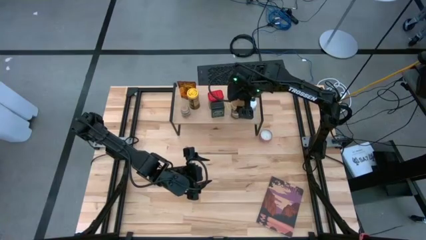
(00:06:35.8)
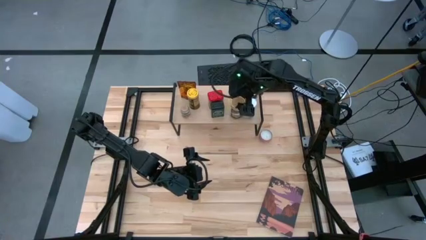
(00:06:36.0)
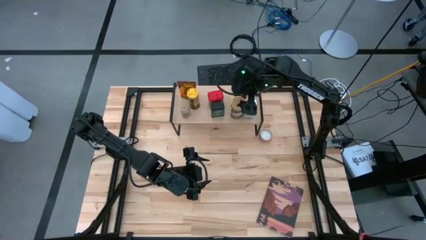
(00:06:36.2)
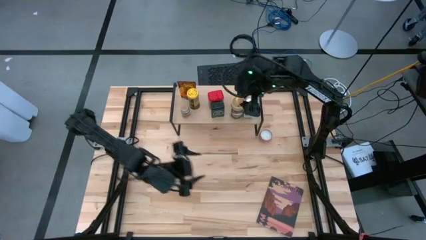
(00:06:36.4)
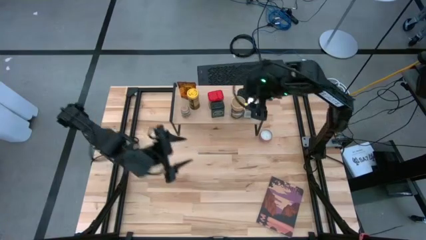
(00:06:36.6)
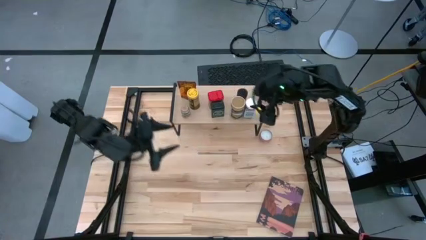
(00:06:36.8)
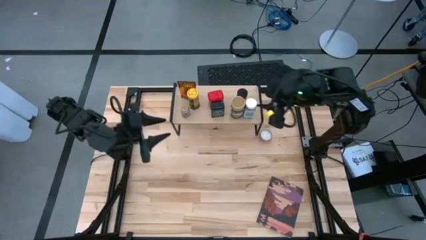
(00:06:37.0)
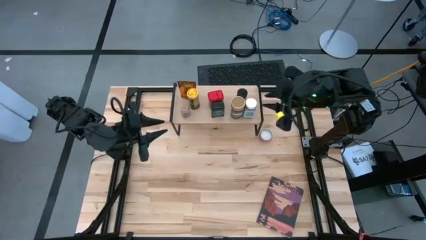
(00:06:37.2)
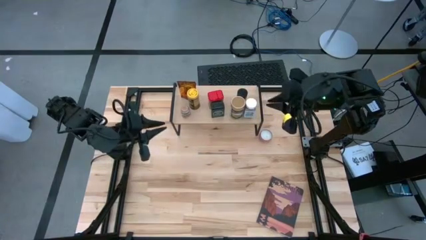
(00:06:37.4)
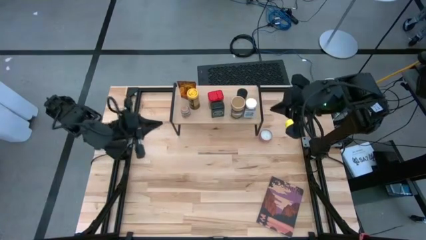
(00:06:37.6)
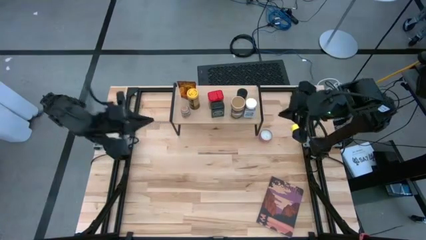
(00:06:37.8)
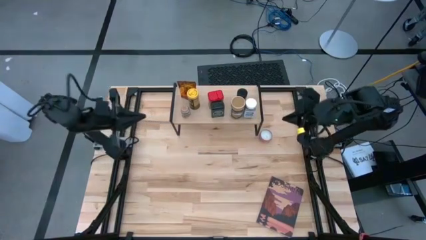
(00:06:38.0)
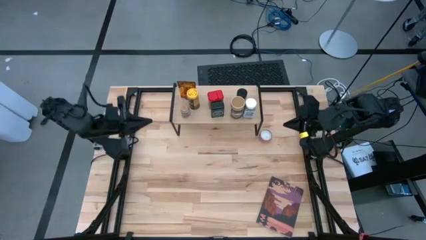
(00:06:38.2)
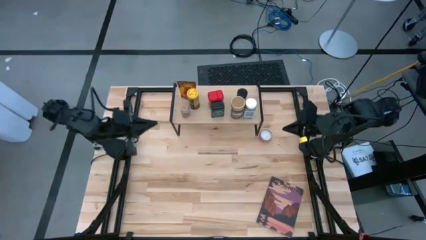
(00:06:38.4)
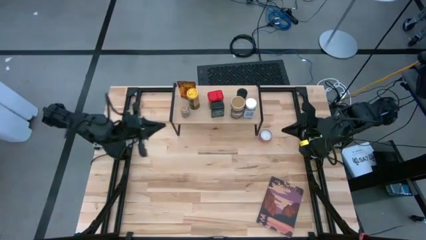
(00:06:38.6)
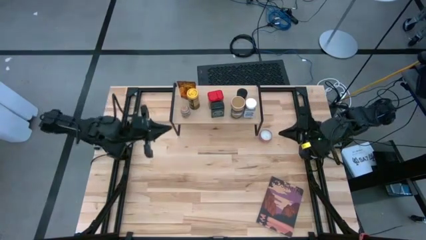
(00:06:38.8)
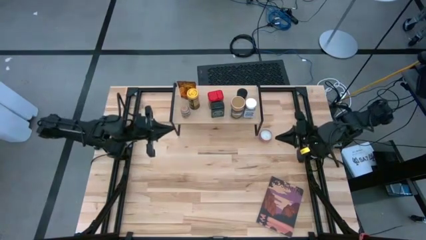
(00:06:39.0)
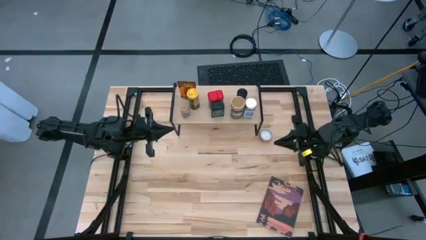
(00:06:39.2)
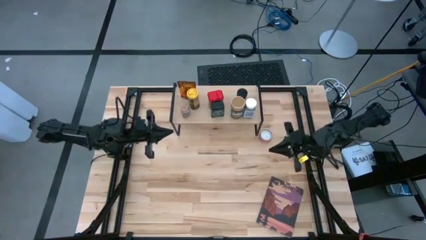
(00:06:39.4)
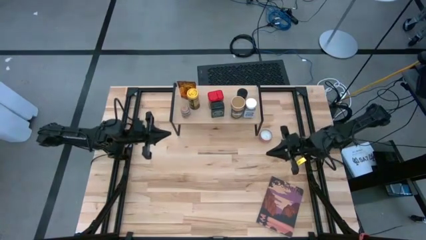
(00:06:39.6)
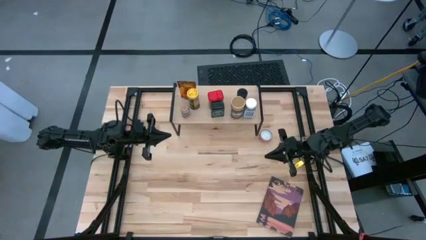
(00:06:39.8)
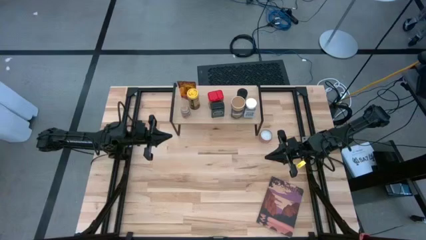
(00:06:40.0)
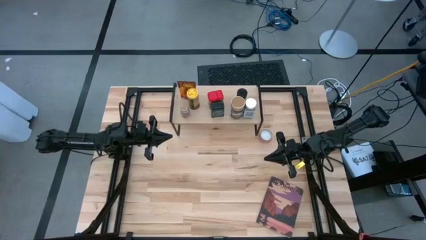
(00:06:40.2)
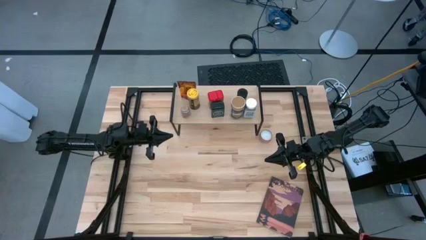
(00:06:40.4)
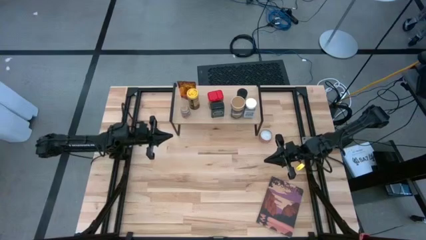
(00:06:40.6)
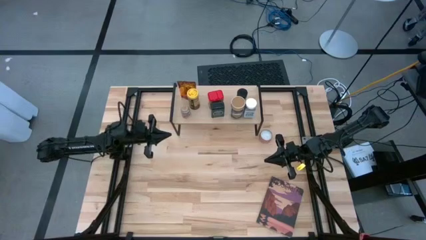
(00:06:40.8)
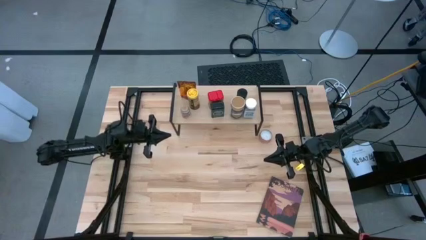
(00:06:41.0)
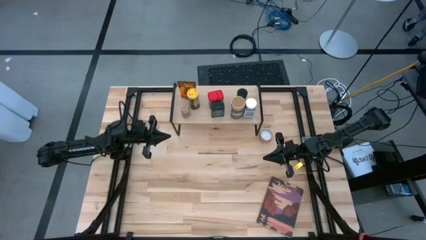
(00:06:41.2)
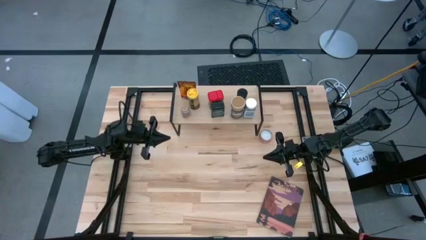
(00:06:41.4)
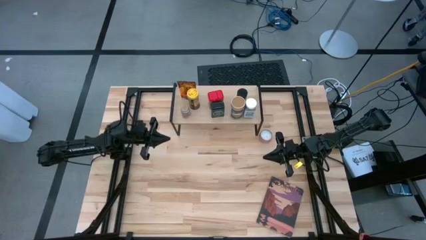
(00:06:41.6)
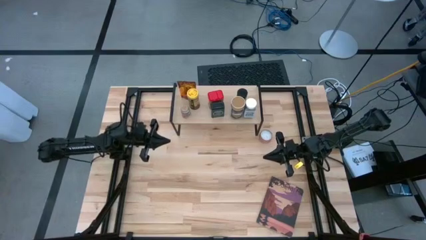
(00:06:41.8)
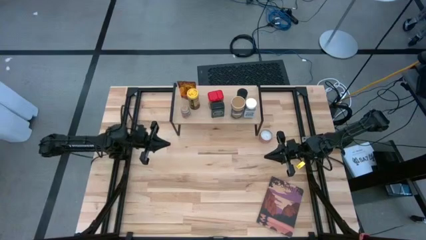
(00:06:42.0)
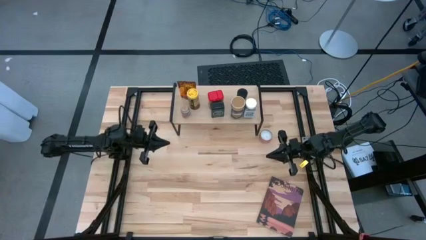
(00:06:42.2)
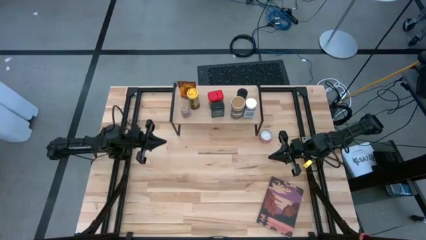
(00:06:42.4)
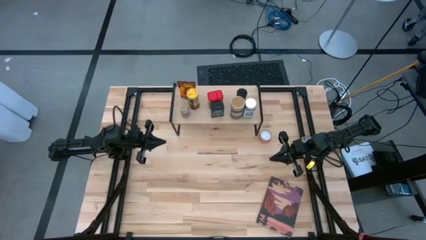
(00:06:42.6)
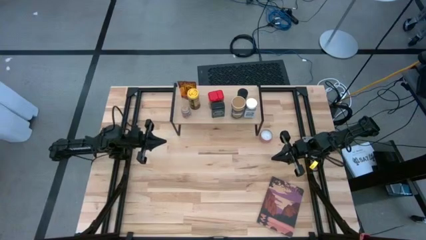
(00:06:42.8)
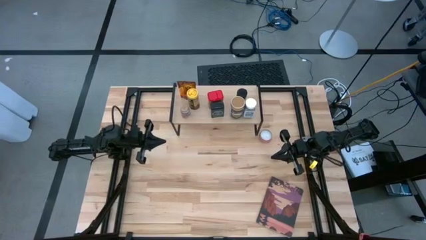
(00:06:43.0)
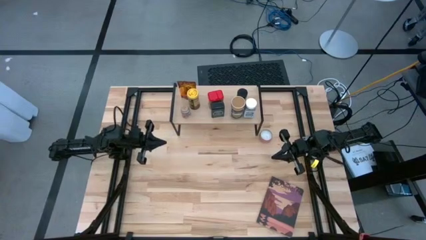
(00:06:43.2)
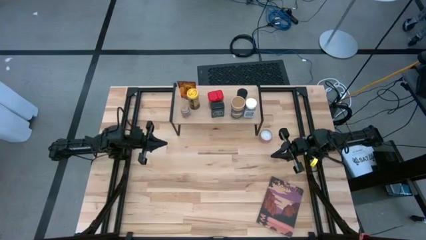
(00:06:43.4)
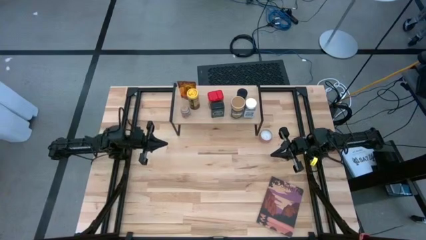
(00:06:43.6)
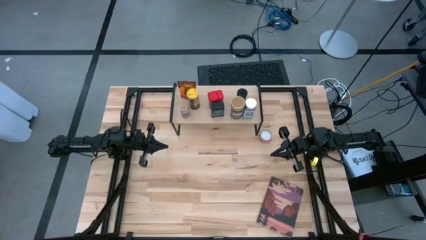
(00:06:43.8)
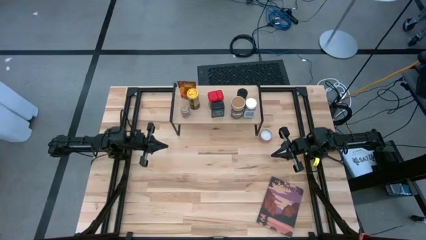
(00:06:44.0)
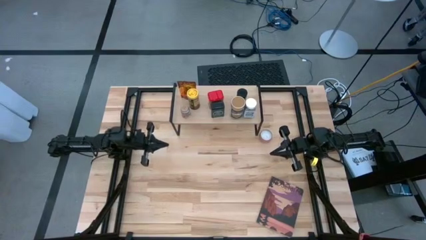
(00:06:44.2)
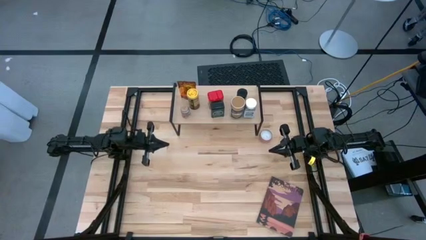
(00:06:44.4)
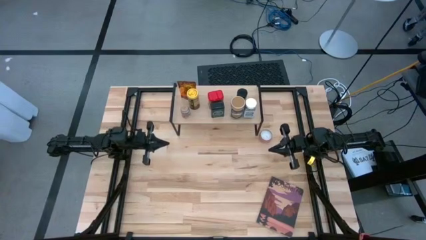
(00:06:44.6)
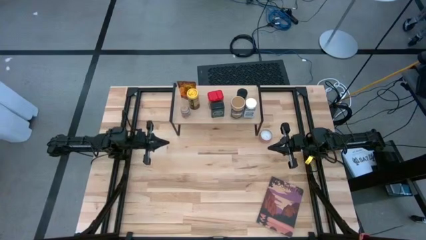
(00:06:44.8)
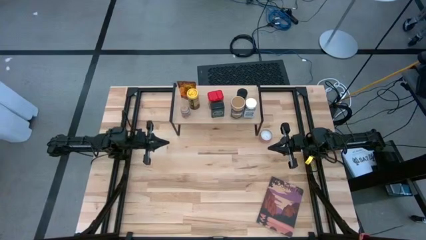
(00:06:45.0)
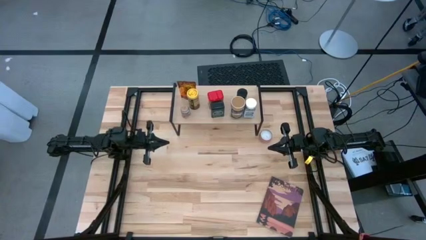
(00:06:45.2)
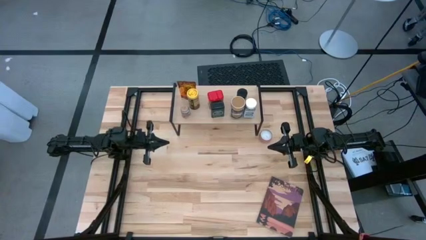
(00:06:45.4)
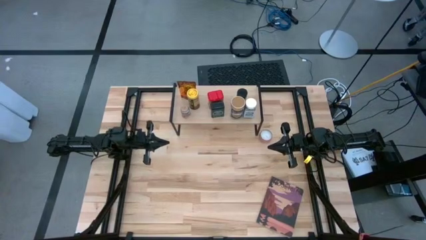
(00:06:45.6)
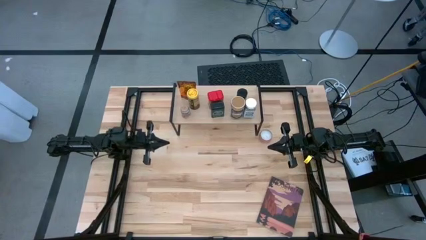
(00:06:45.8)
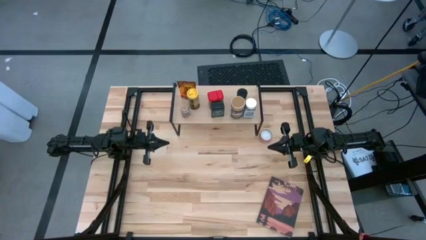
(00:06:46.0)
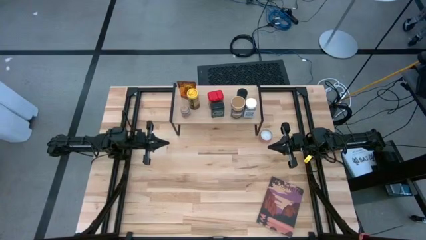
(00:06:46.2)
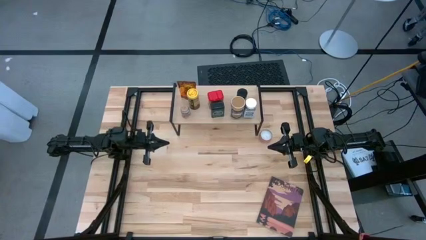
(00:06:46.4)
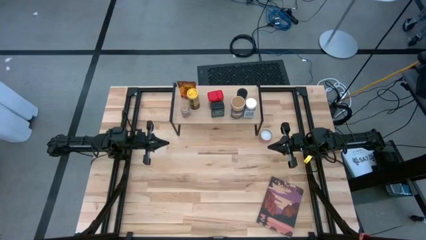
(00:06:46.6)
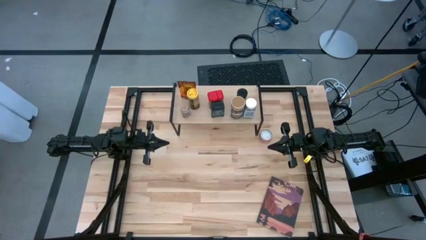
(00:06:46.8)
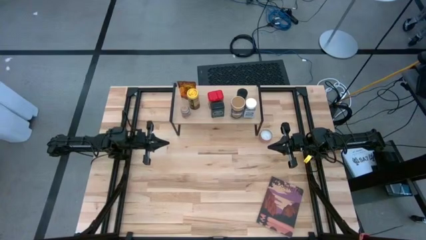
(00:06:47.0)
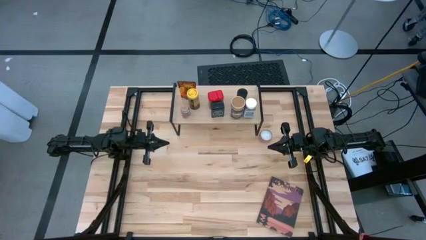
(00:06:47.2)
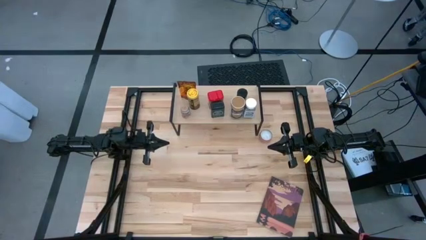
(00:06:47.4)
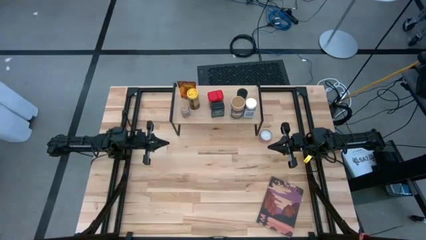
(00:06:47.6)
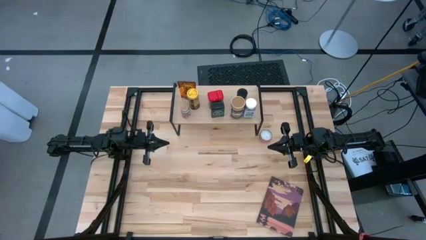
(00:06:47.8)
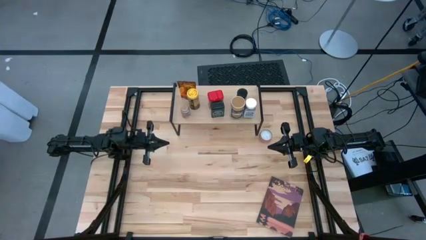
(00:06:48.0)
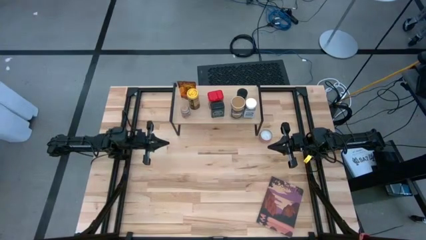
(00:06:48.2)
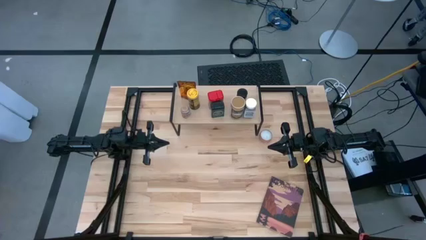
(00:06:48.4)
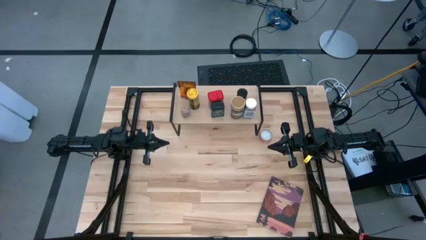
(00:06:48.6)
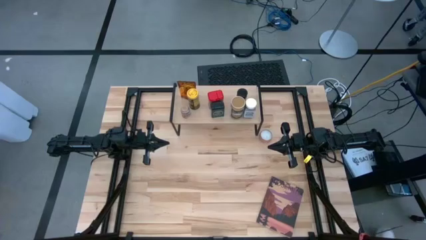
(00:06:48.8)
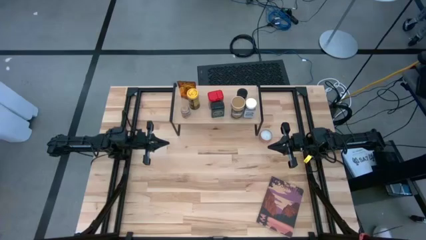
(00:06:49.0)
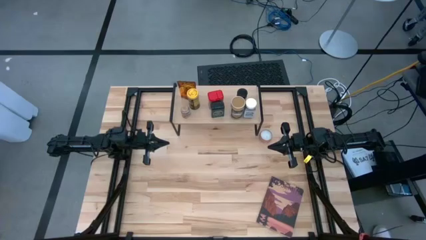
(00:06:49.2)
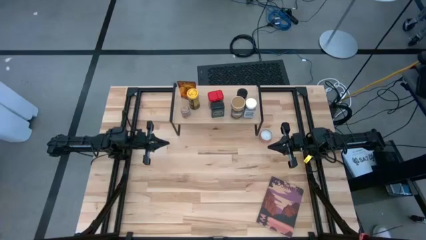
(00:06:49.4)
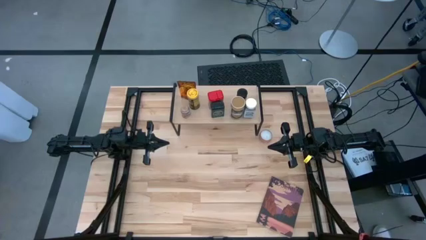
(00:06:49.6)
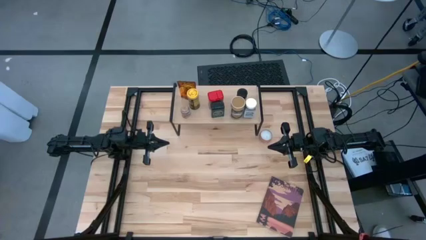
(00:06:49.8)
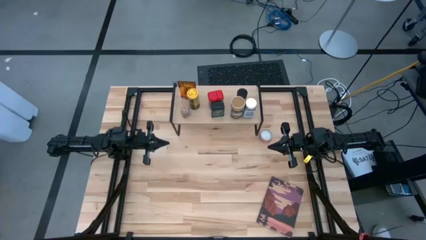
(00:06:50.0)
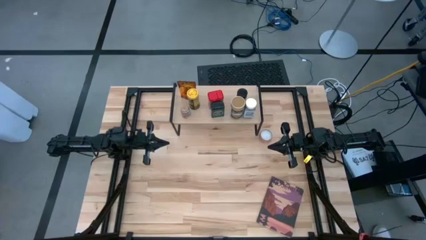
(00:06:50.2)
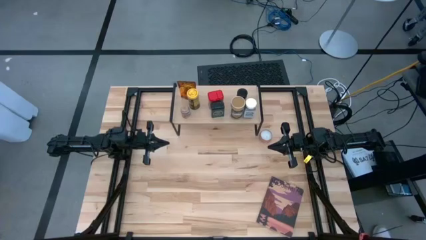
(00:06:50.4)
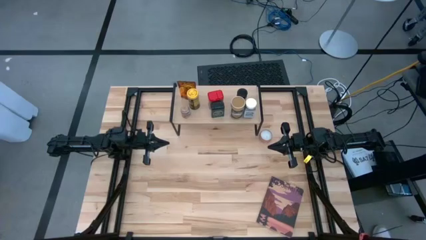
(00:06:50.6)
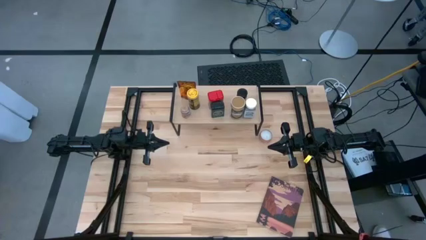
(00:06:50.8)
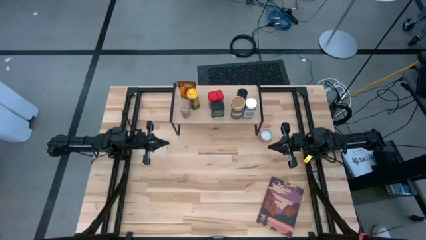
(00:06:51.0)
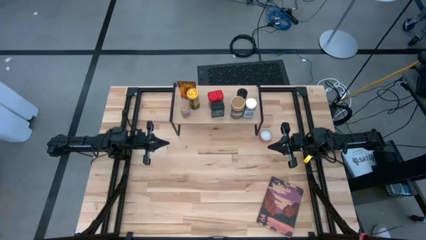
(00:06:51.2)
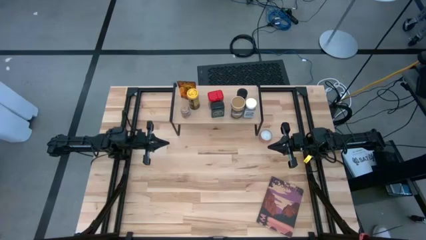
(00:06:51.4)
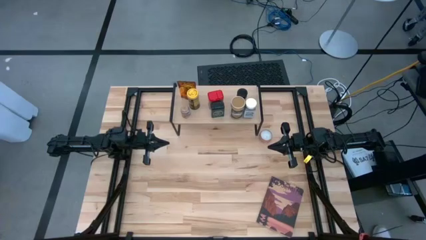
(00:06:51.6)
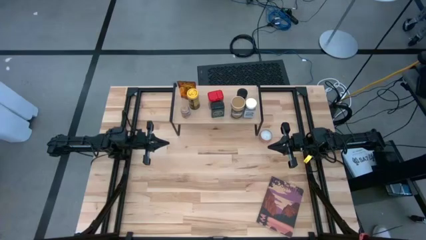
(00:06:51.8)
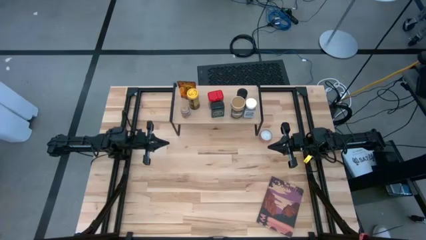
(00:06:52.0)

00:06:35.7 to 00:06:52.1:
Task: Shelf spices
Return to Home Position
